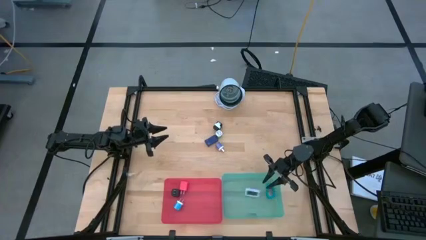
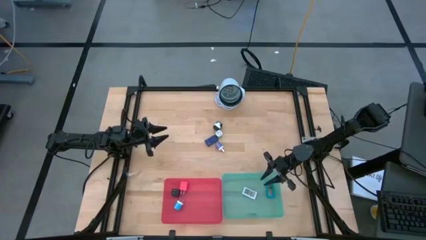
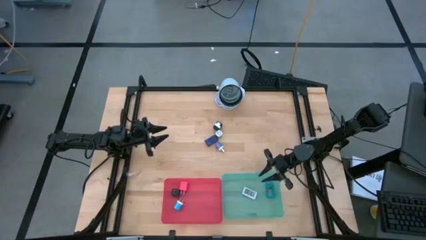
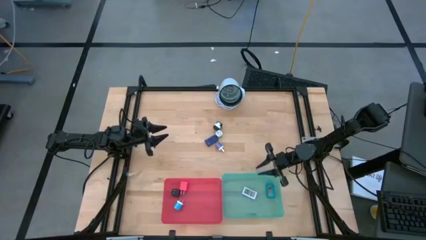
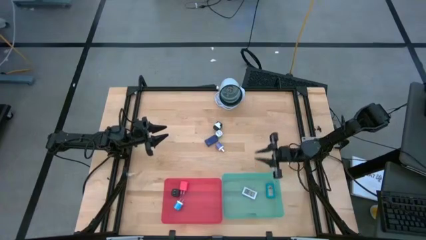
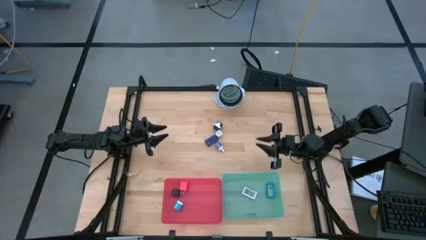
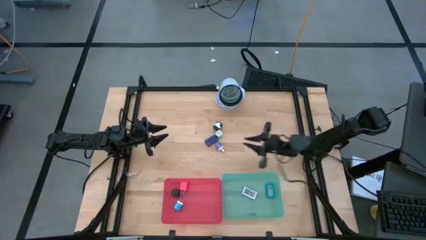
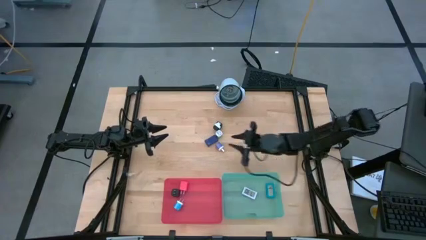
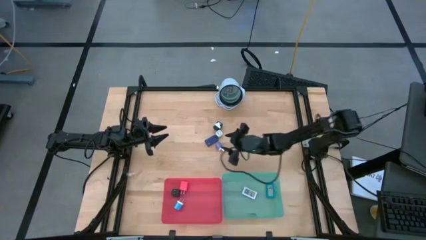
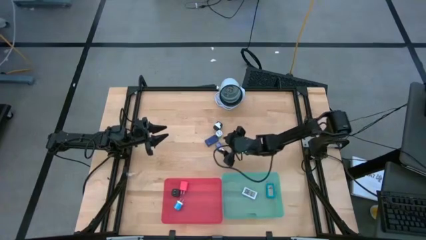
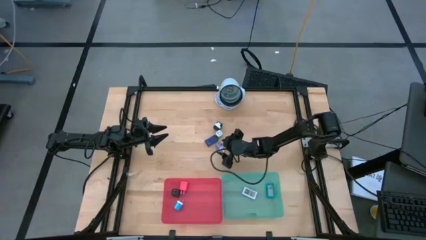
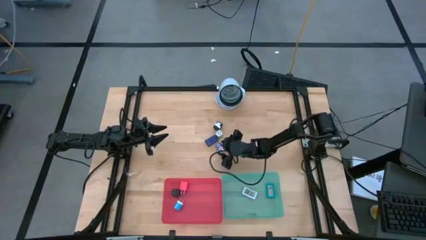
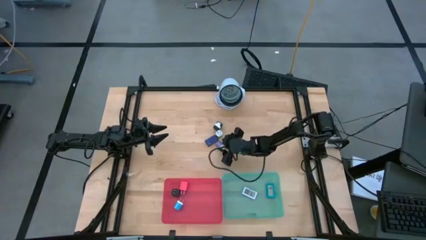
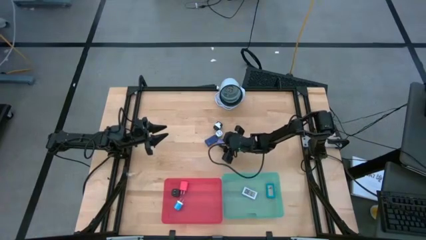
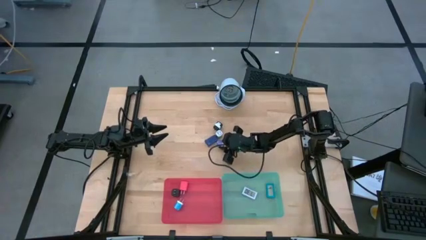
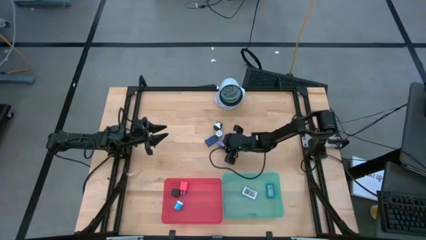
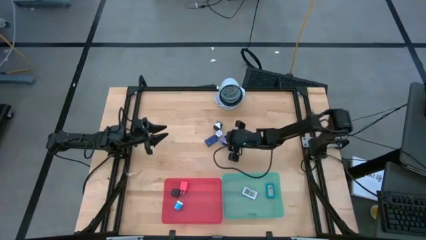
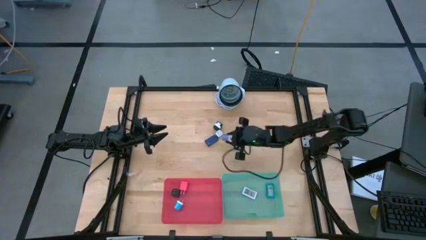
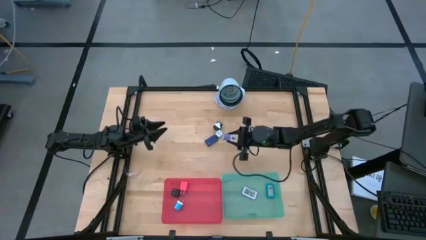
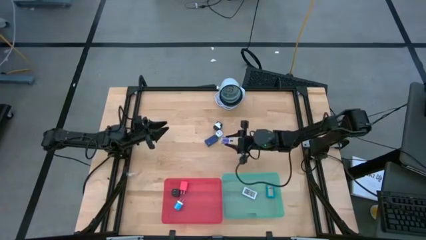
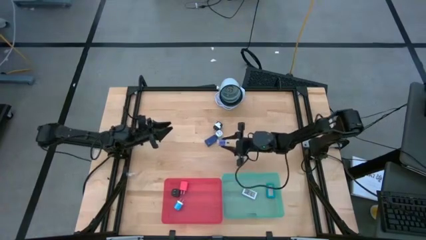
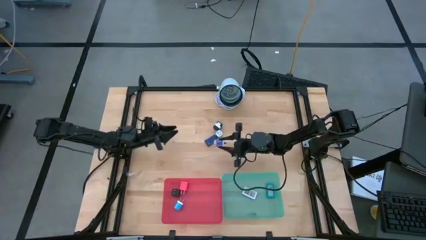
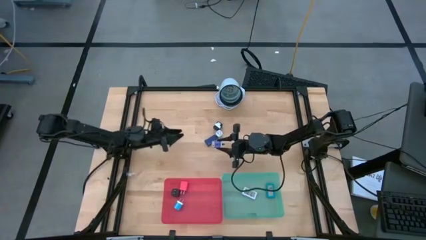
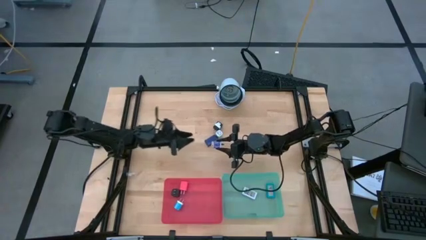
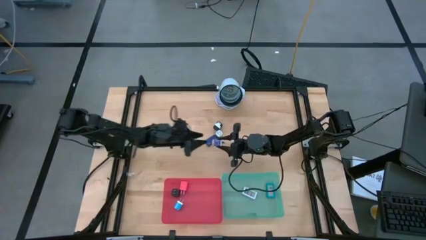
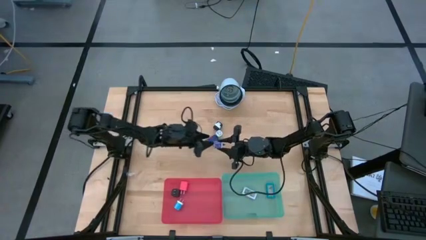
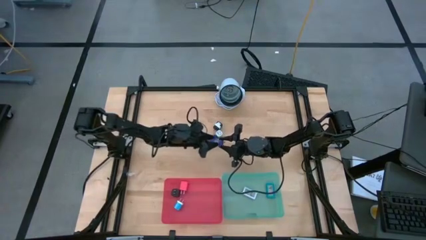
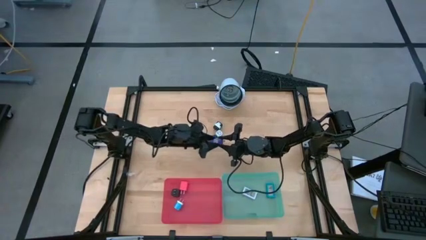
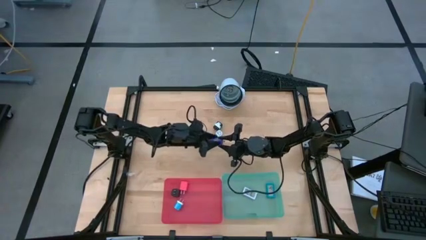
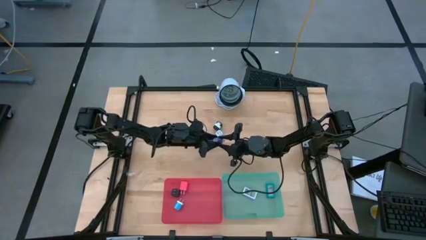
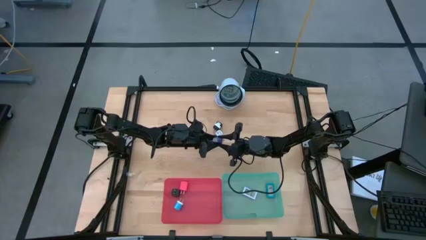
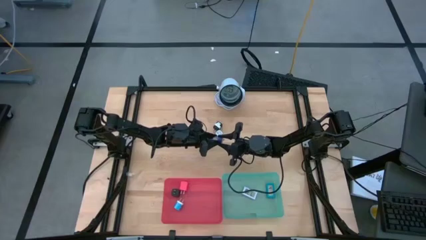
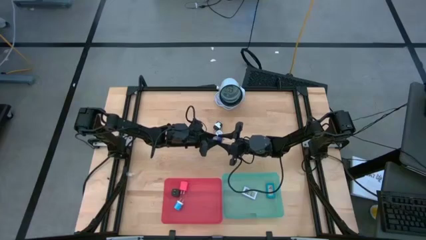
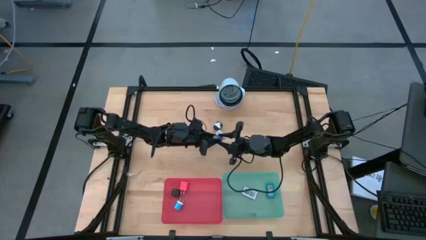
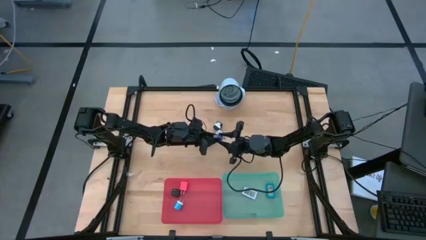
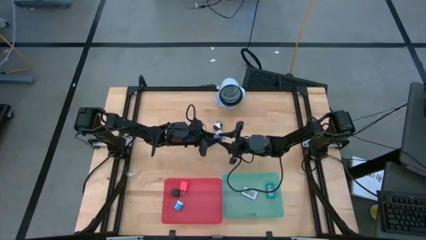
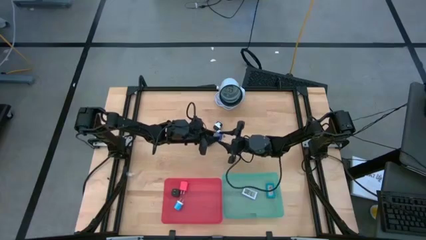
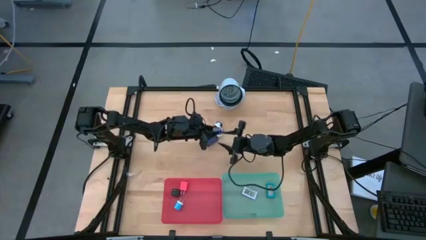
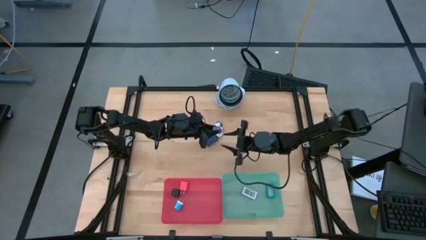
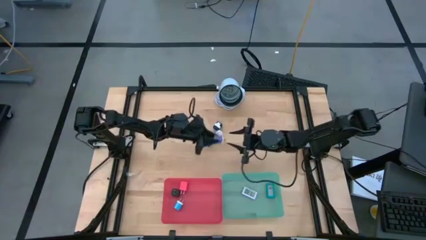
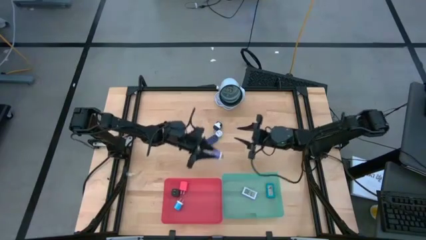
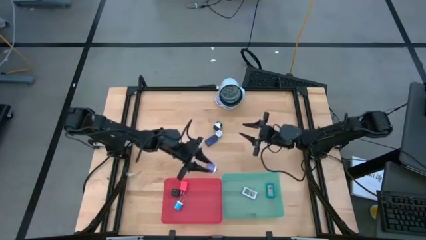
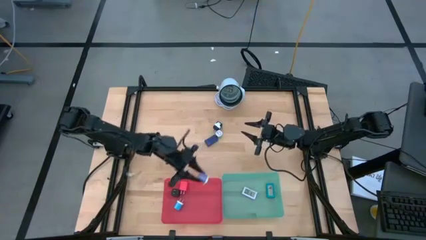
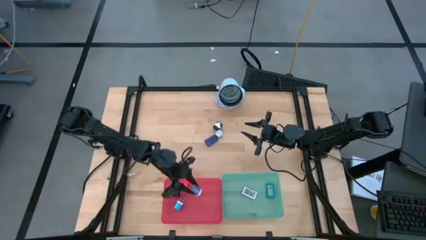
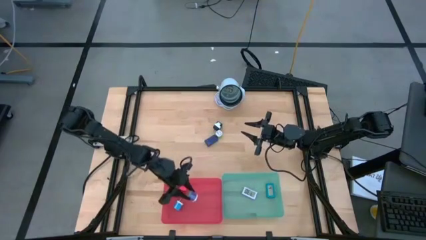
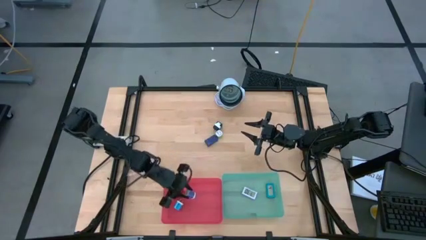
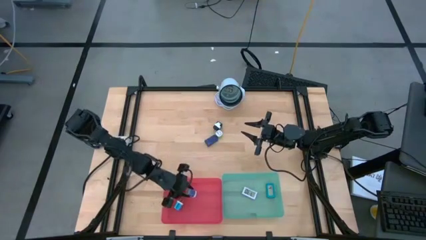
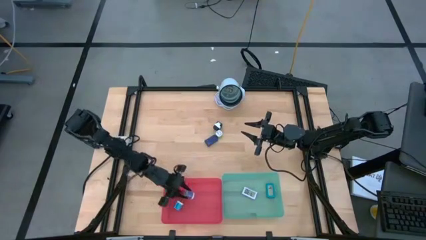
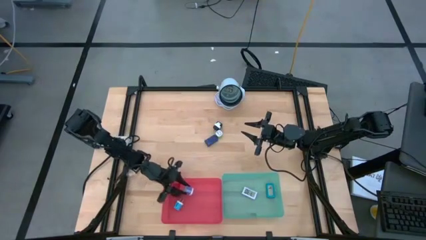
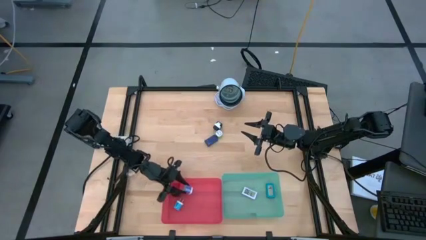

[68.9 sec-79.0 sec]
Task: Pick & Place Office items
Put the purple charger adapter into the red bin

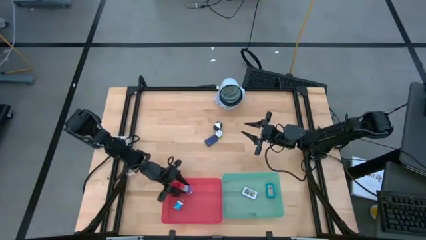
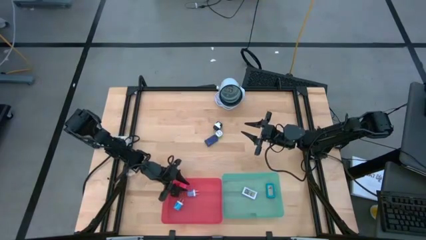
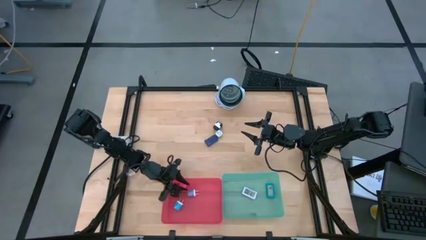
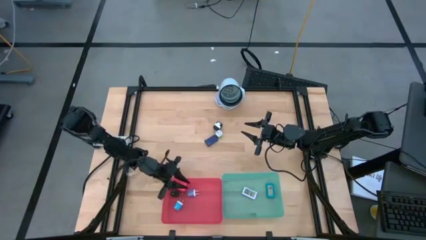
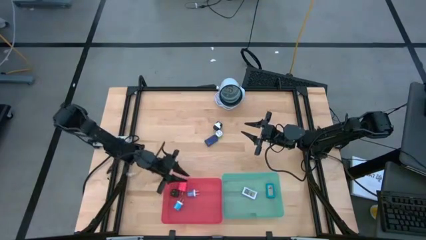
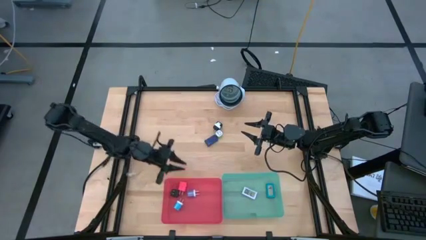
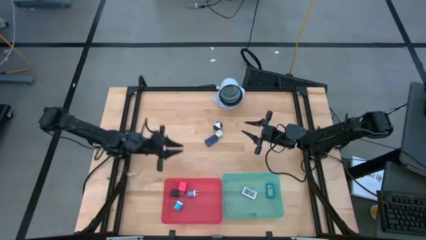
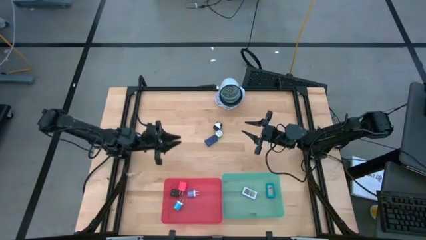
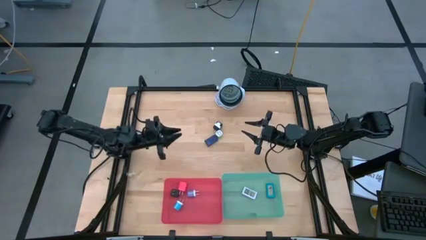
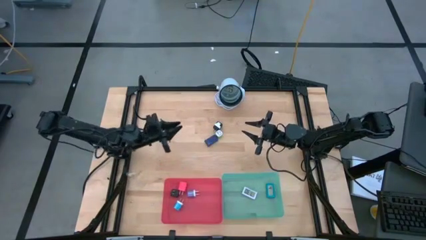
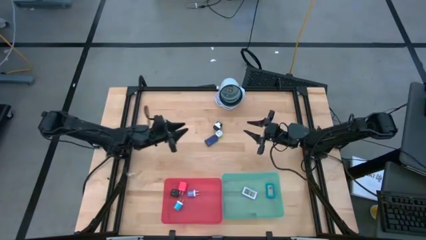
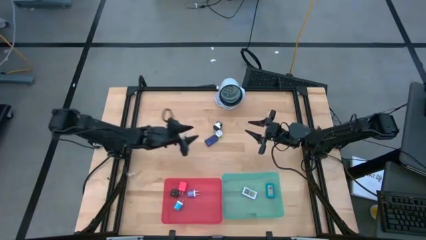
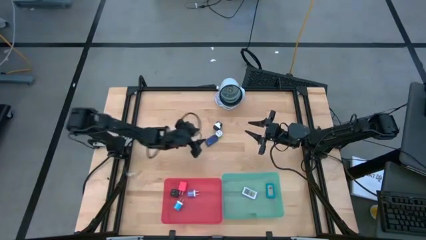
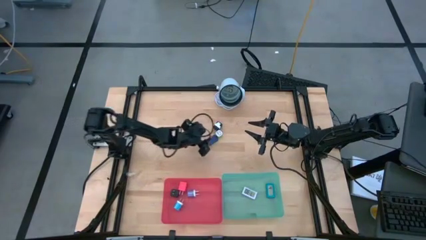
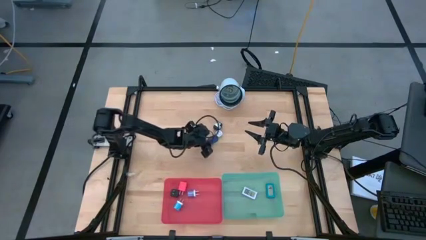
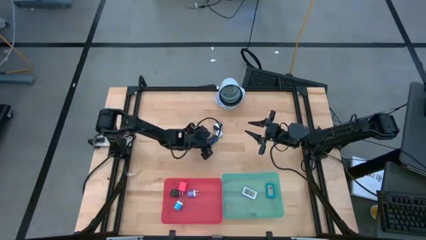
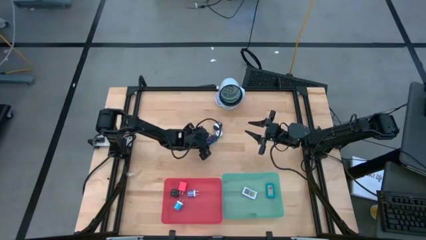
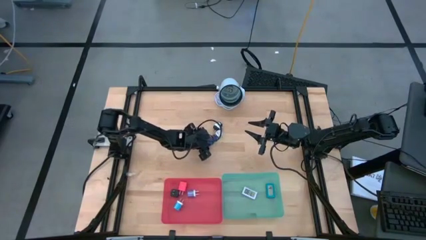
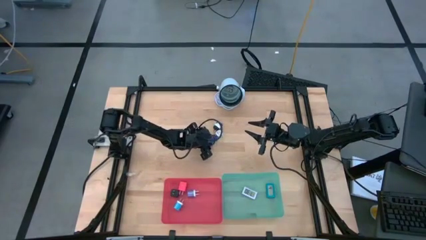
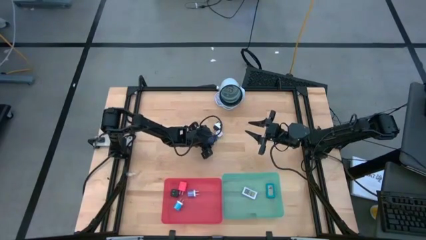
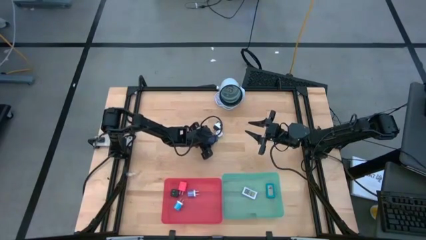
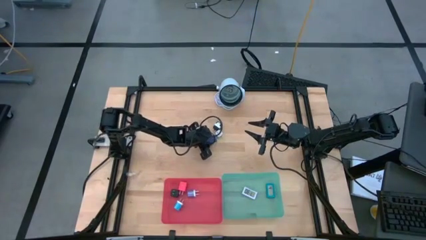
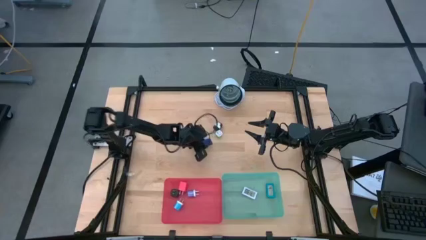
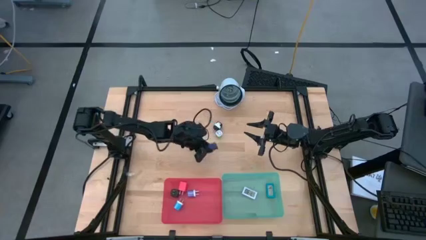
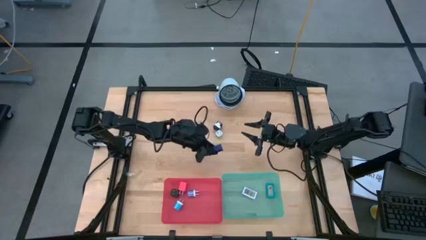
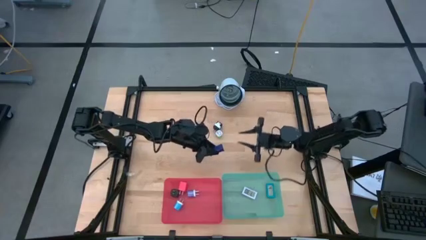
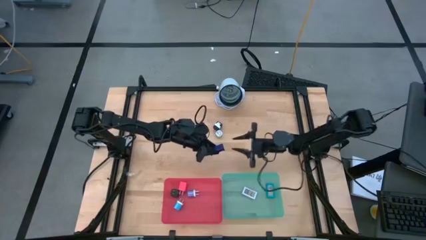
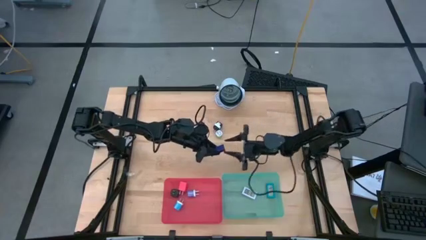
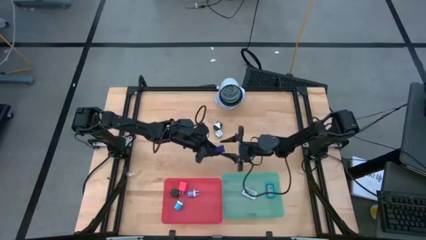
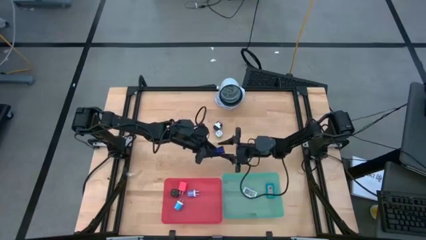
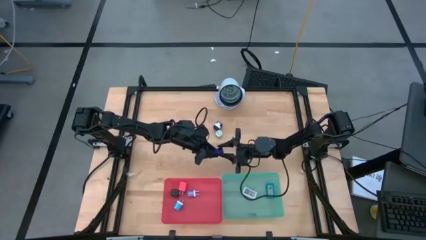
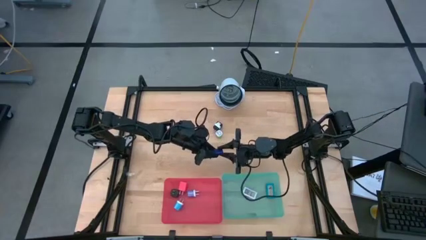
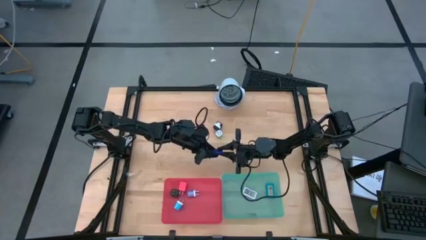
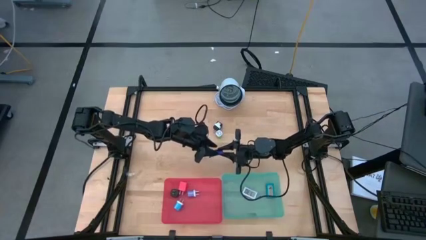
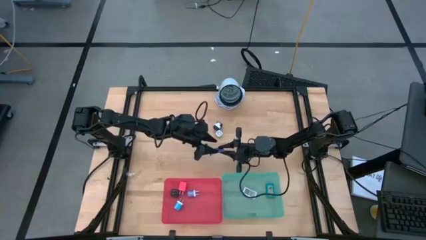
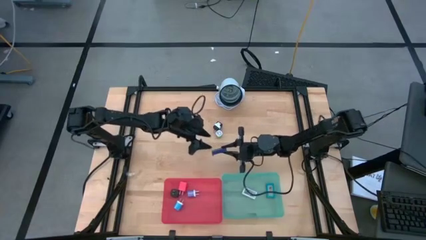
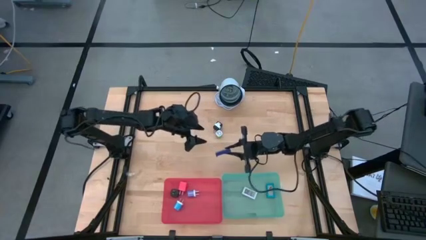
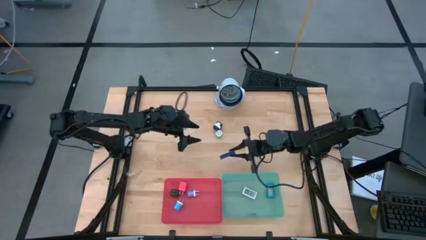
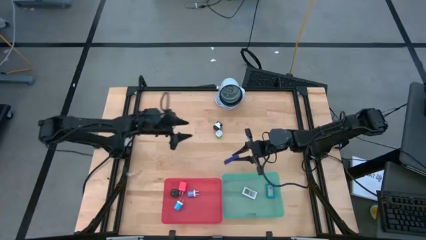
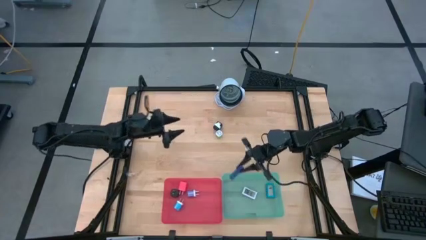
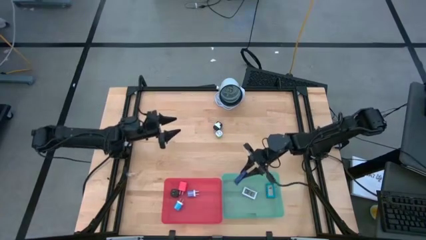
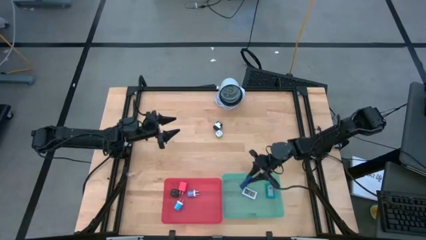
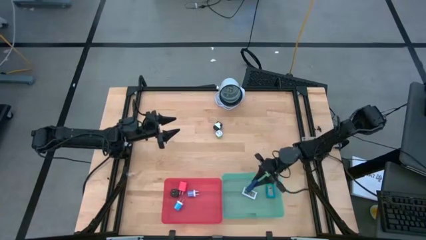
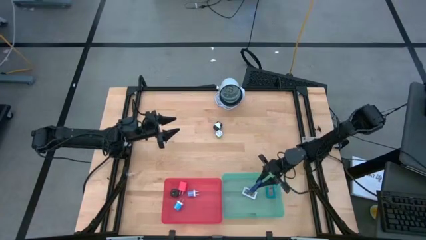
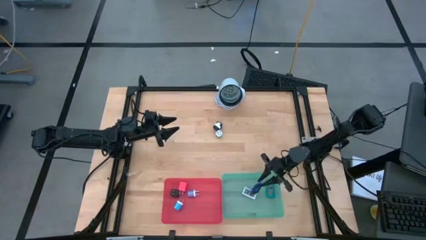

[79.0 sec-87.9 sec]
Put the dark blue digital clock into the blue bin
